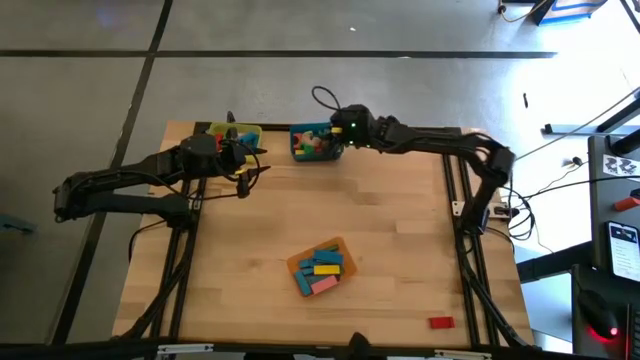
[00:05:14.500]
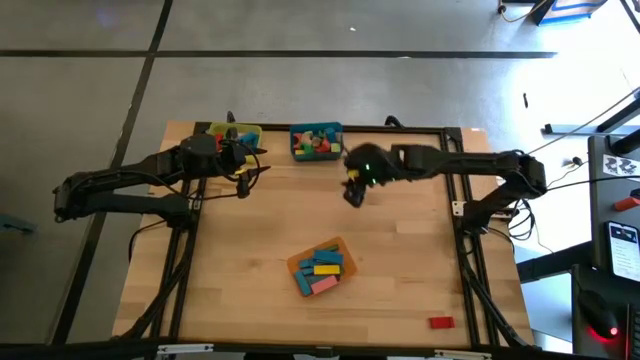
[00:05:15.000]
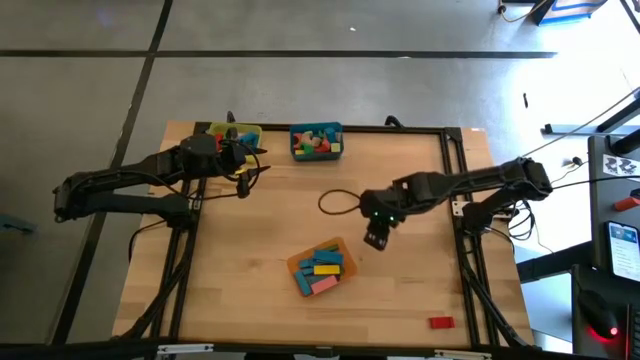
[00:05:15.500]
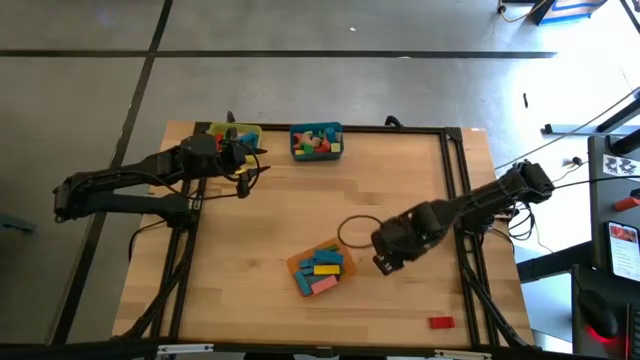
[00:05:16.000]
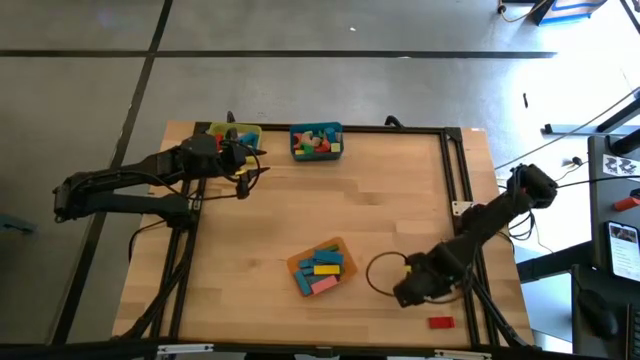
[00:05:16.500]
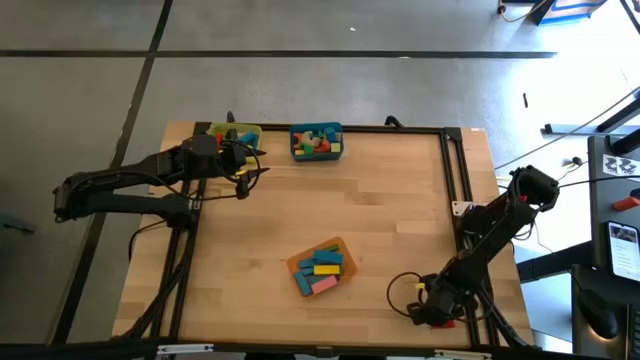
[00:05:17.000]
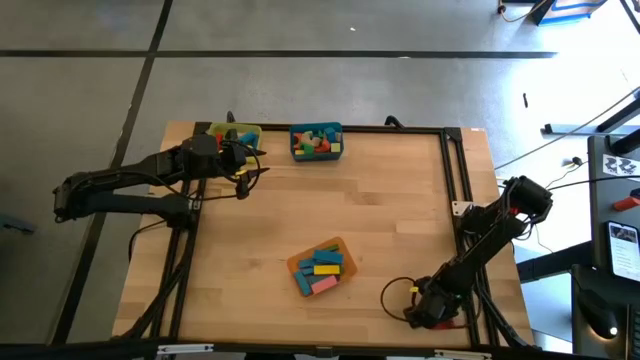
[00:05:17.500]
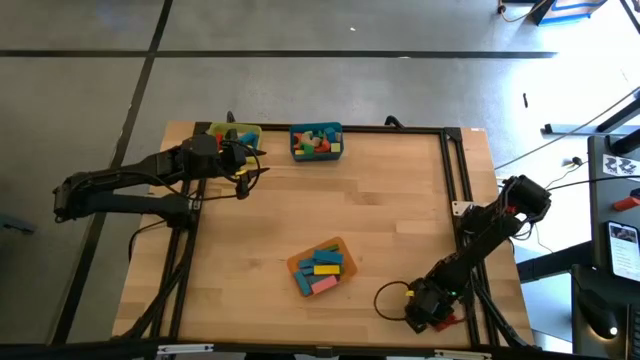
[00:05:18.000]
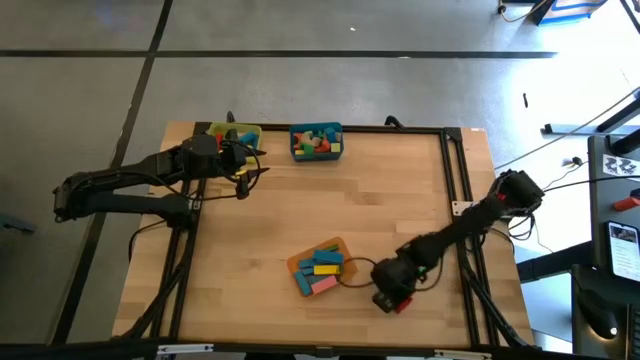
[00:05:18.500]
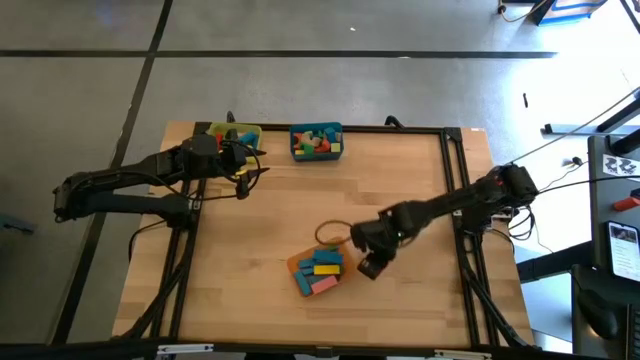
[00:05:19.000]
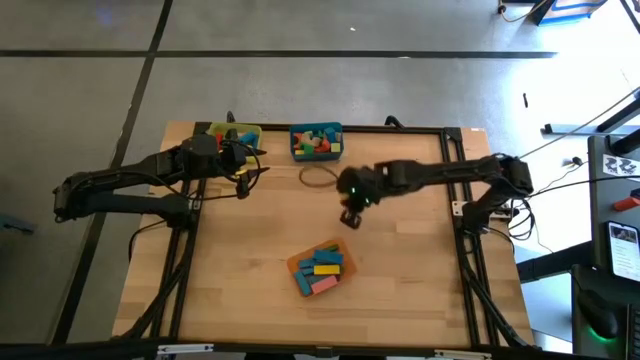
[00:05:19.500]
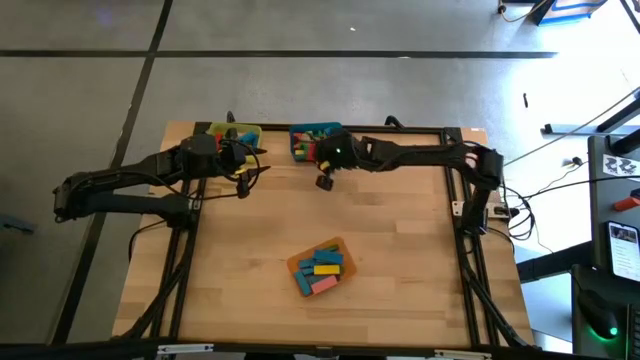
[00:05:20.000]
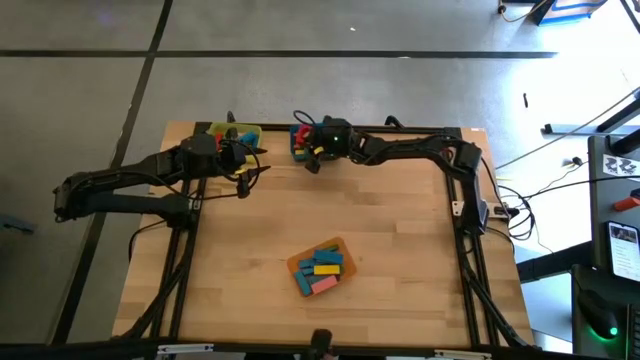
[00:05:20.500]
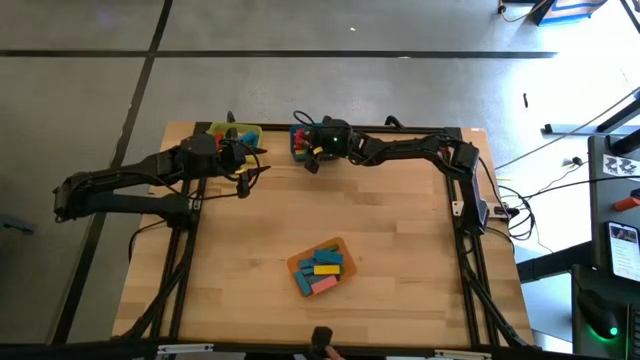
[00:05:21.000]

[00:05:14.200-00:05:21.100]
Task: Sort blocks by size
Put the red arch block into the blue bin

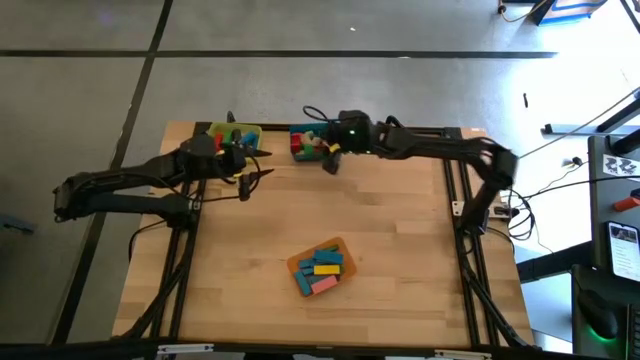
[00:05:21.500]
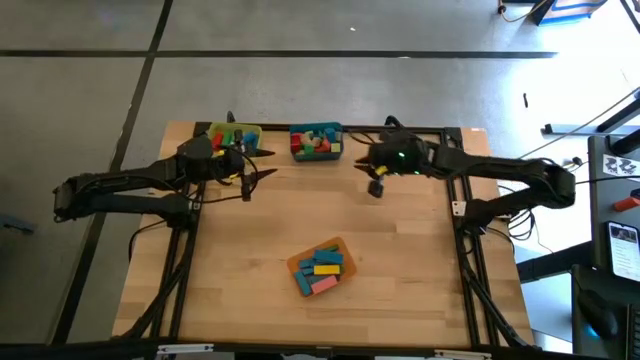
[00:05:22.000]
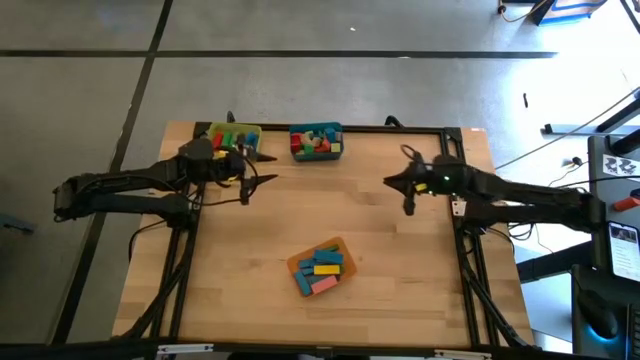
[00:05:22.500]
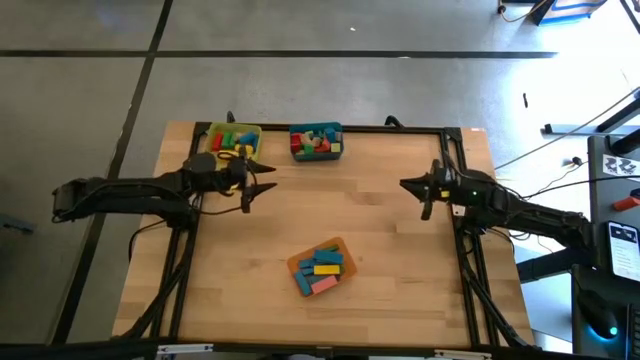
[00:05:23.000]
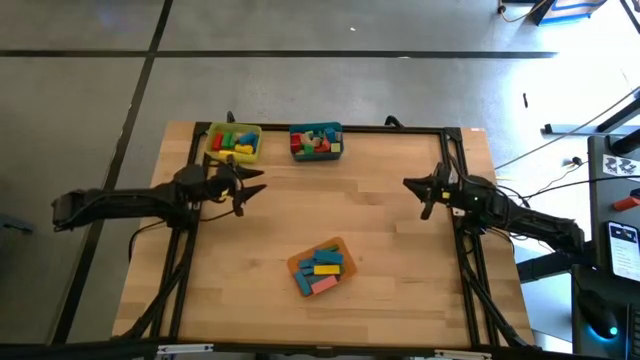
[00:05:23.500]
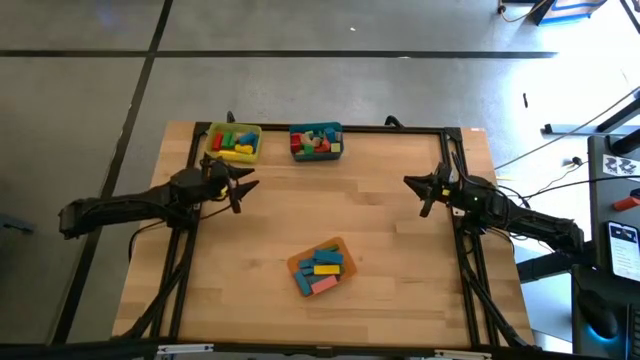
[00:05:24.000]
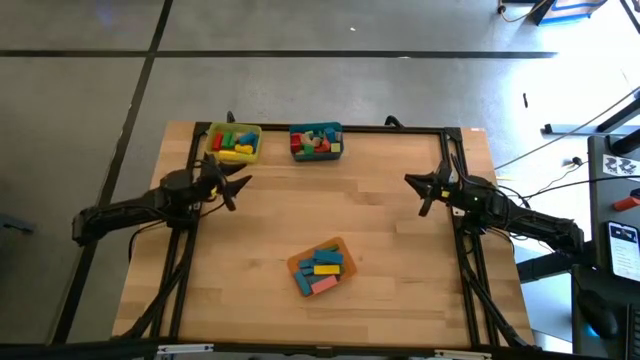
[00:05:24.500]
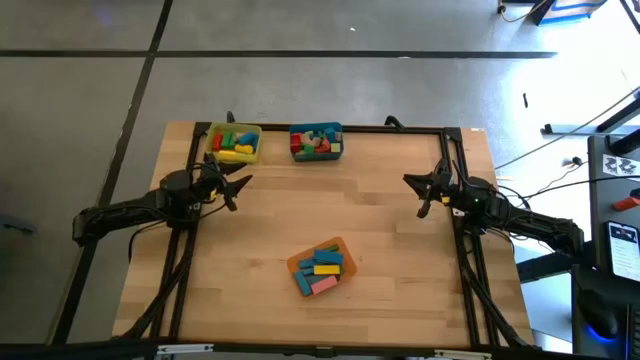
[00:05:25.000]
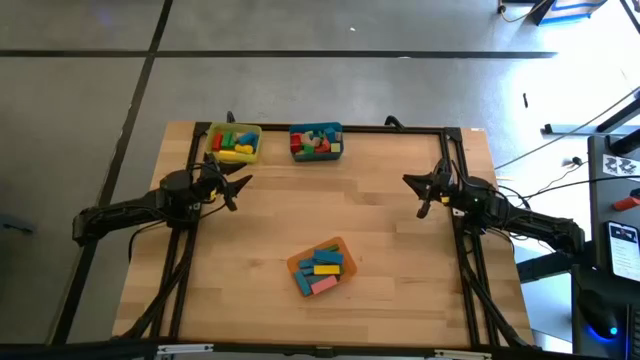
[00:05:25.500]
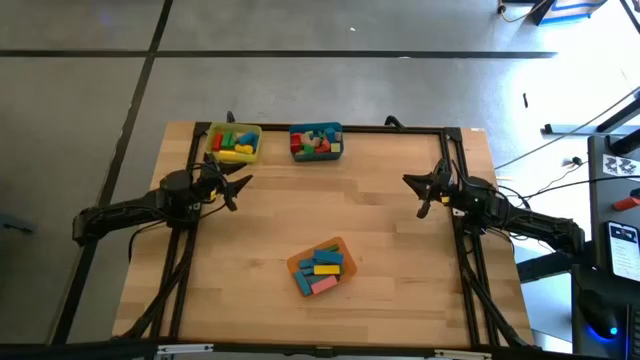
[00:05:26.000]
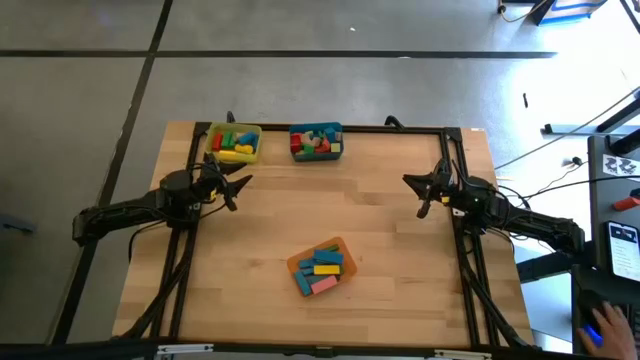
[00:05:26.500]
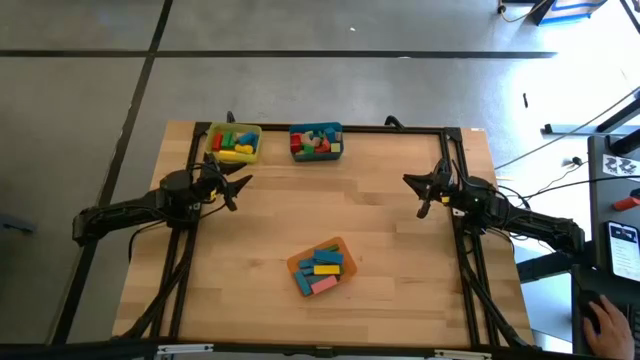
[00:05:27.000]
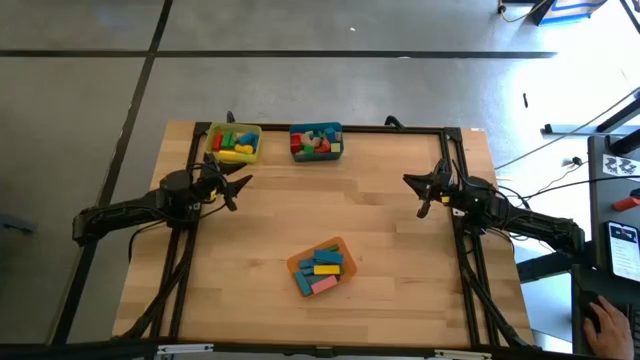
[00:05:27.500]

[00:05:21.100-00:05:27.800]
Return to Home Position

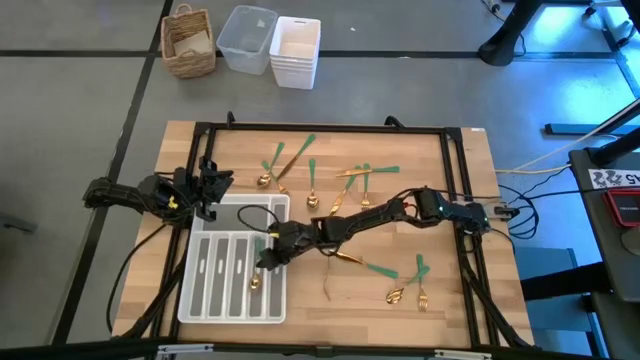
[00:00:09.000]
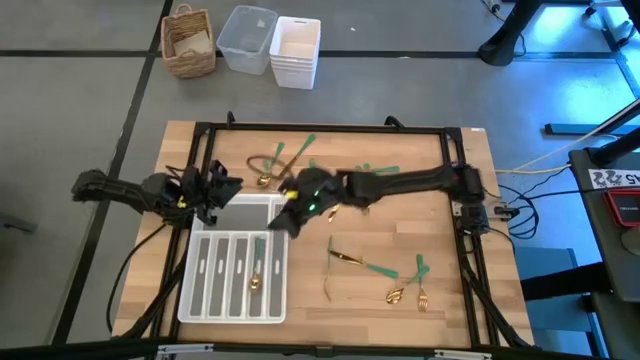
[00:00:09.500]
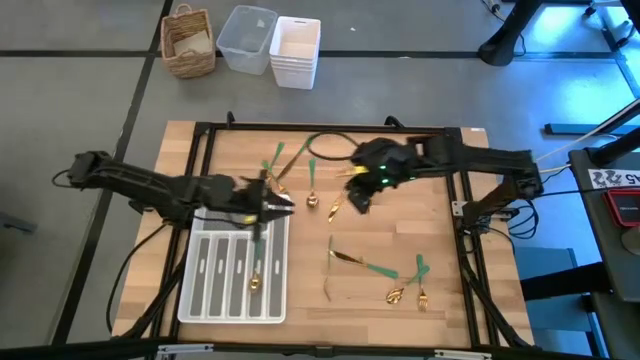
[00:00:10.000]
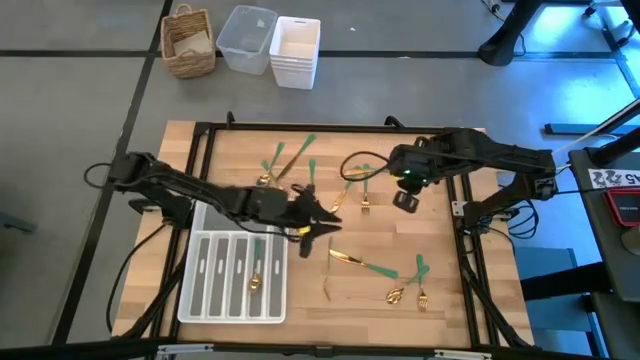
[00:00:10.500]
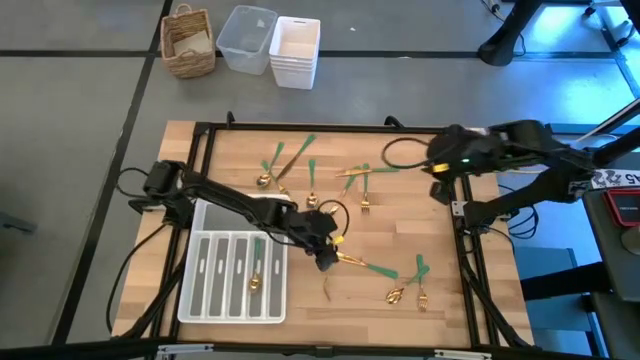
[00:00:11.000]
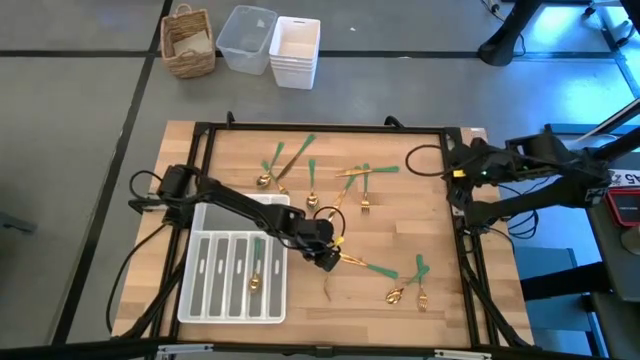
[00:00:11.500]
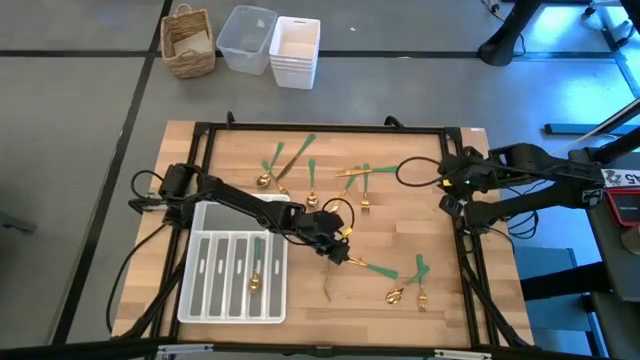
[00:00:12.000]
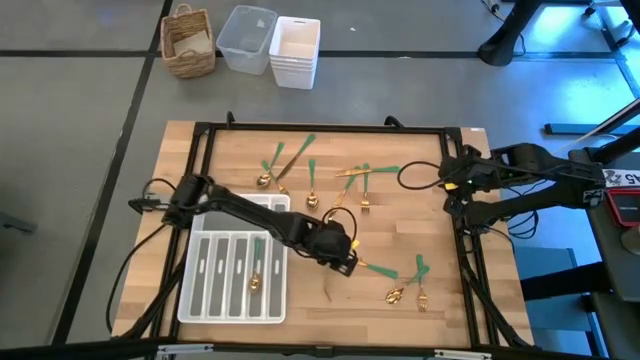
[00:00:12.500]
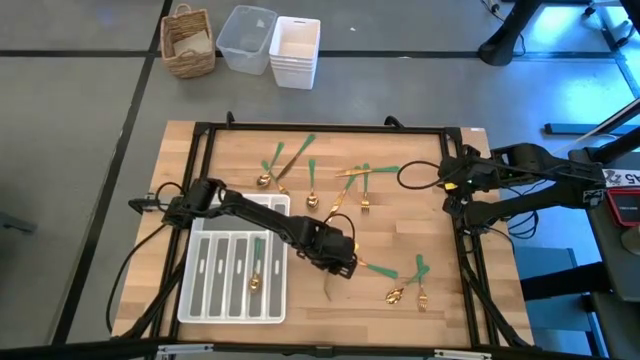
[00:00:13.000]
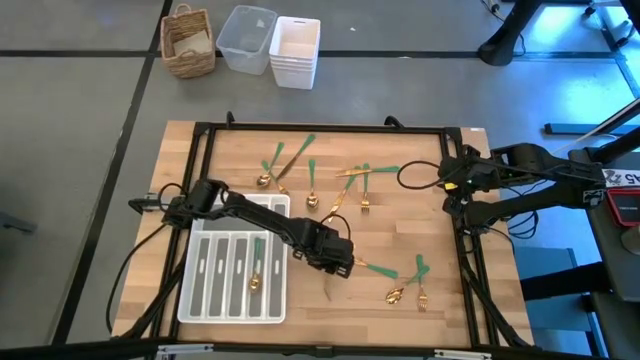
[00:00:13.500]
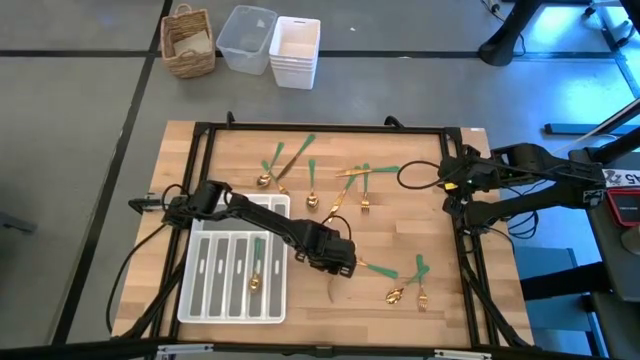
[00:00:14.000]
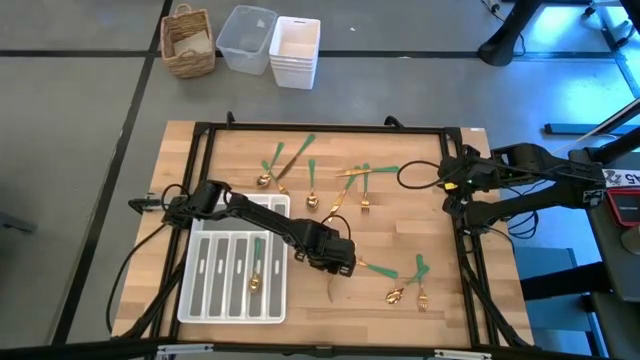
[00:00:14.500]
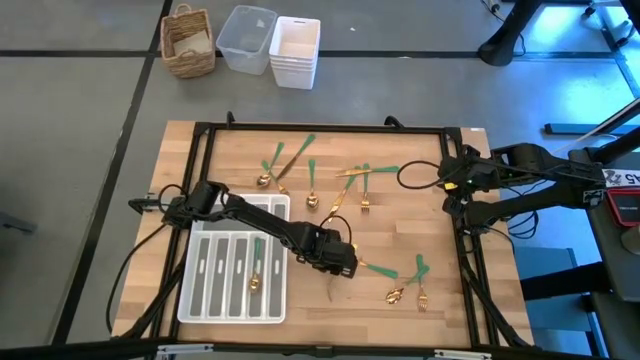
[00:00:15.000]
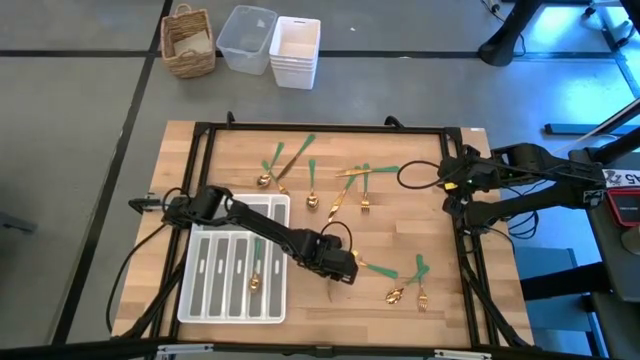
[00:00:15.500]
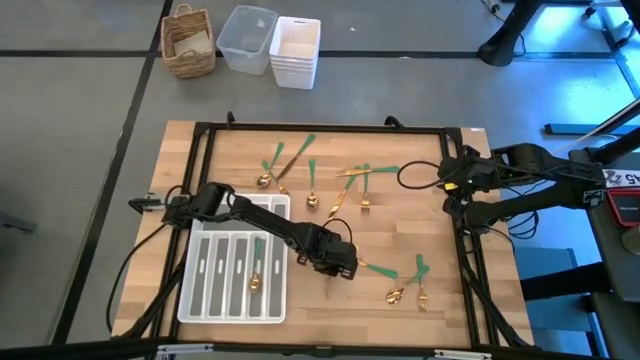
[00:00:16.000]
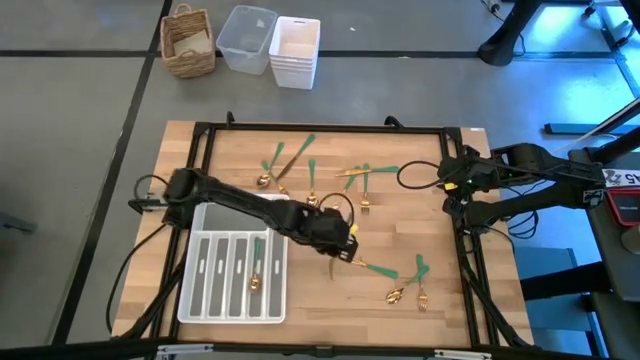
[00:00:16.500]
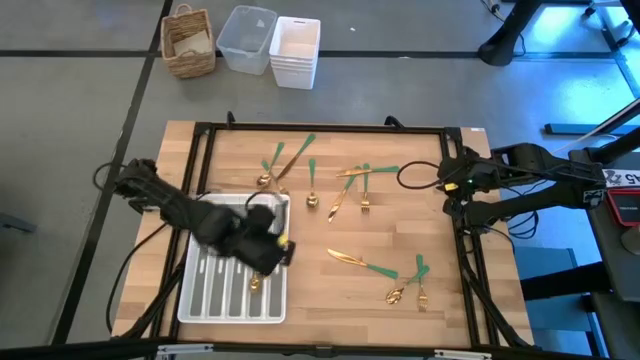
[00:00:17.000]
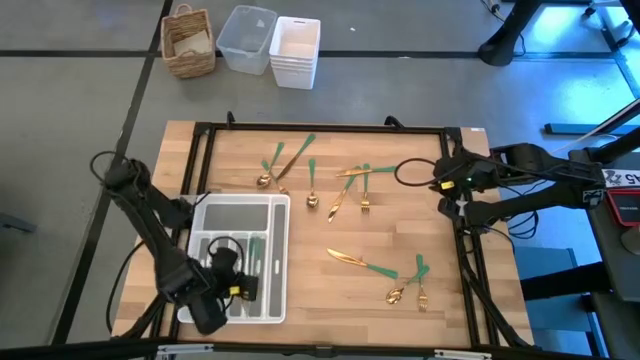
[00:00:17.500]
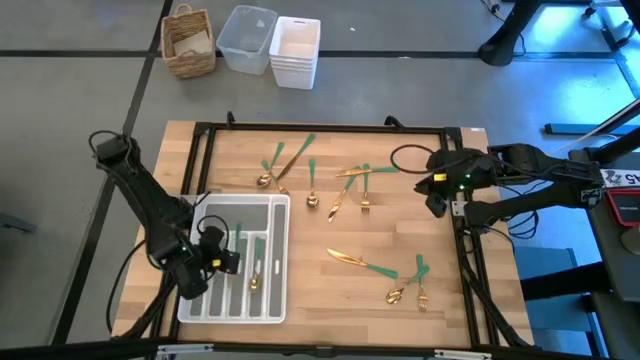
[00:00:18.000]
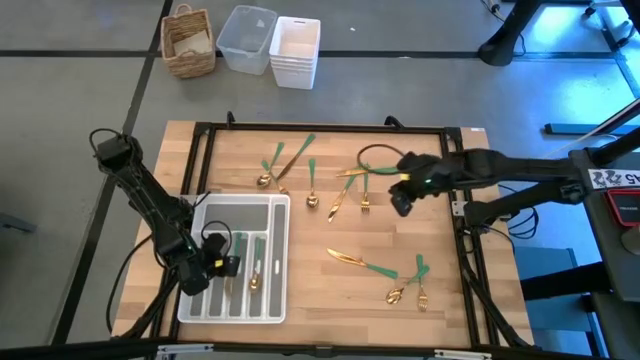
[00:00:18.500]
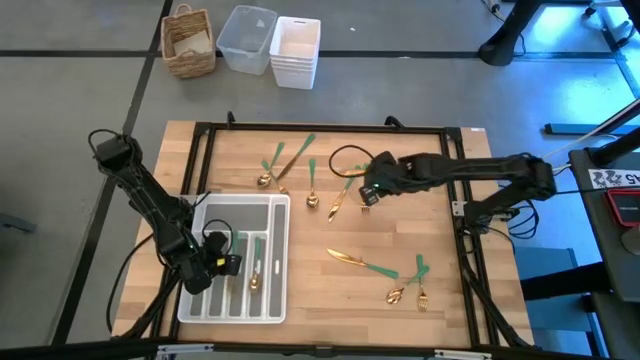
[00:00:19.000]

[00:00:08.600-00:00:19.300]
Task: Sort silverware
Put the green fork on the silverware tray
